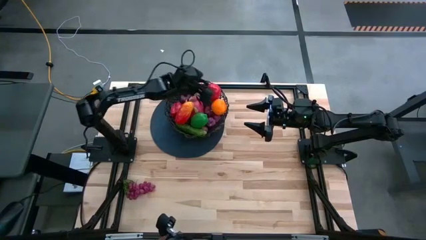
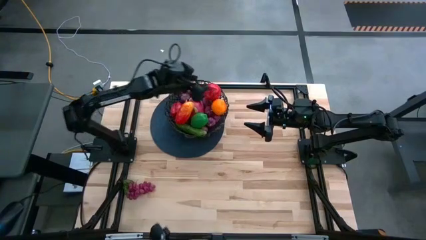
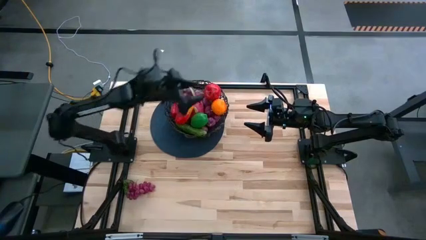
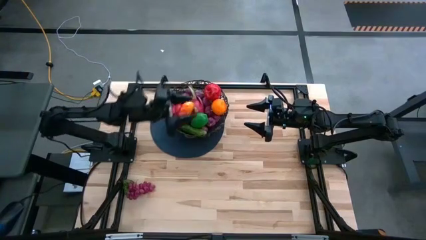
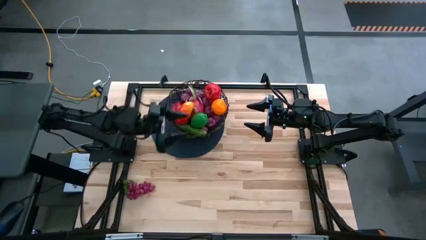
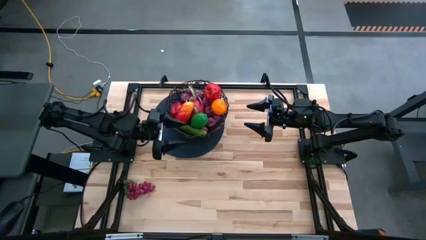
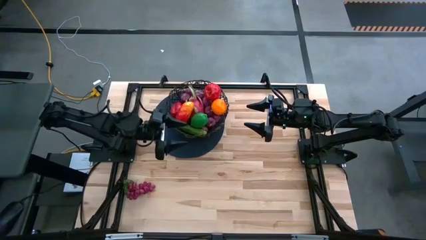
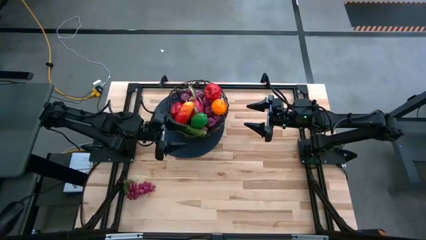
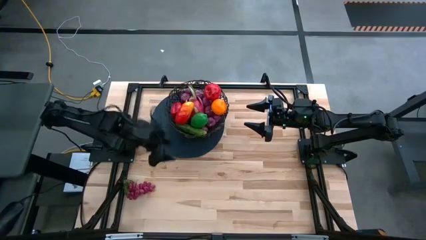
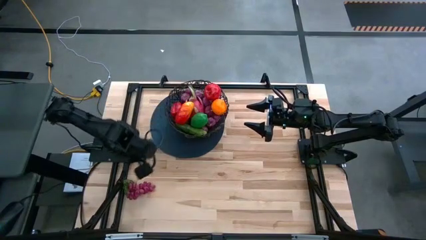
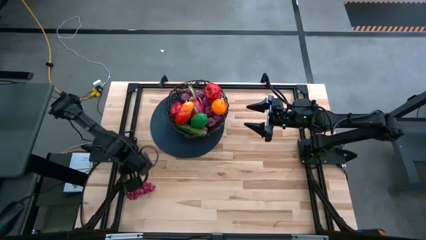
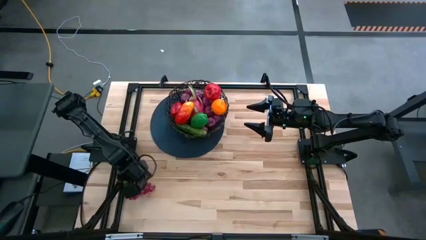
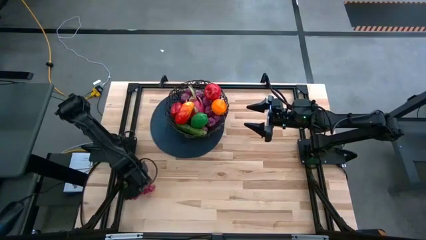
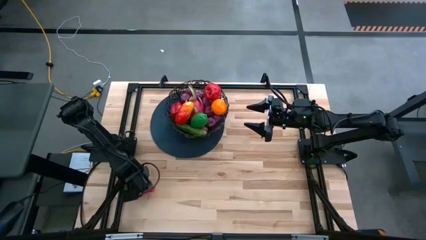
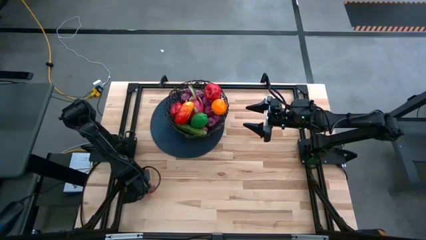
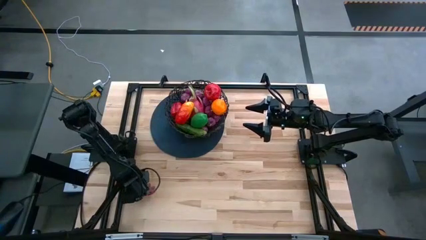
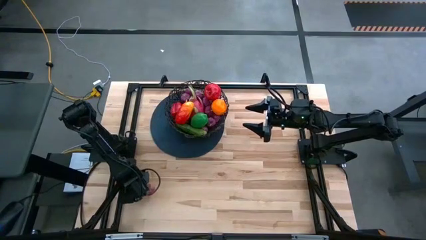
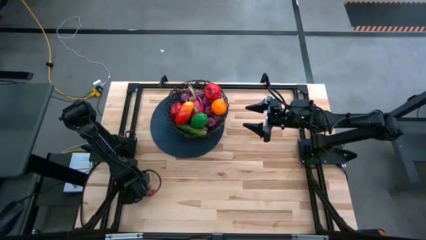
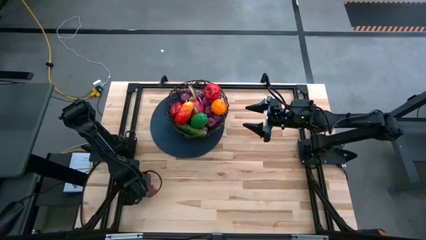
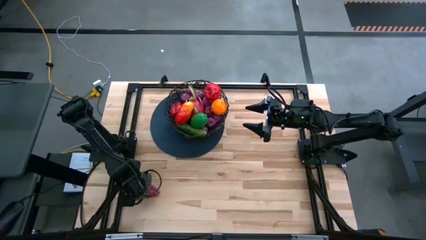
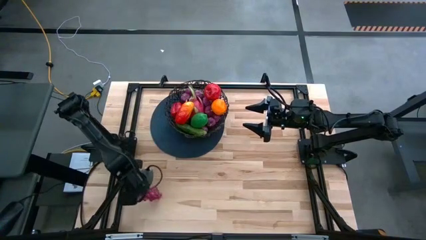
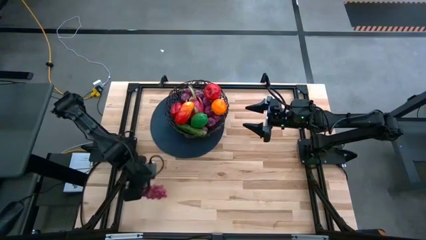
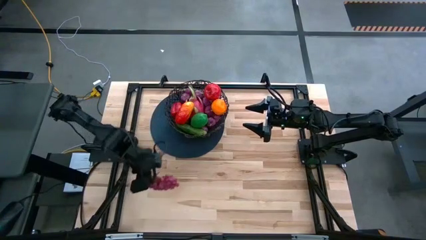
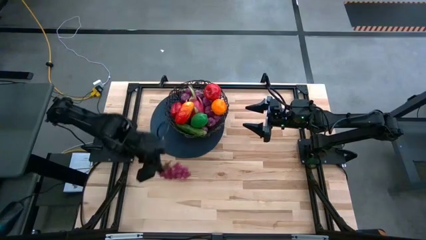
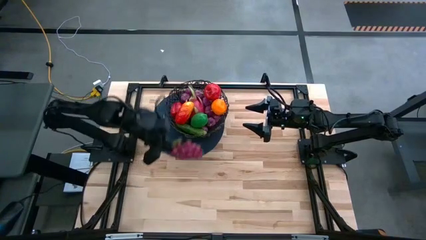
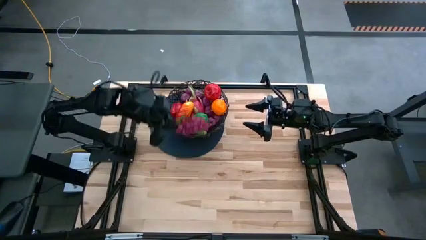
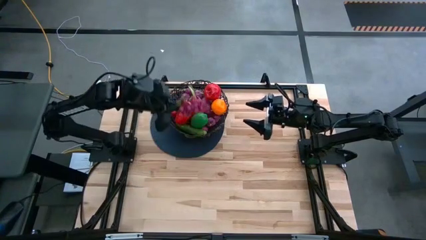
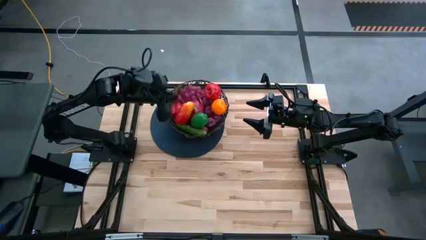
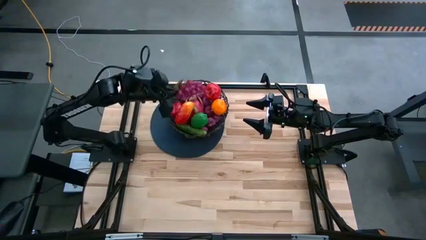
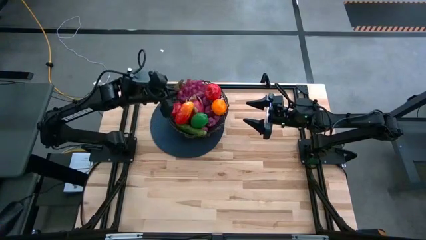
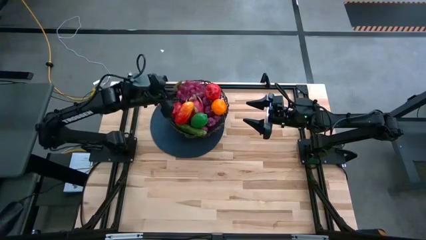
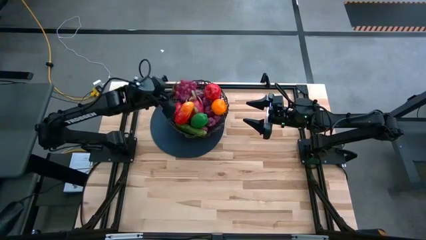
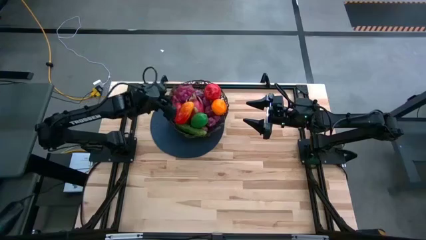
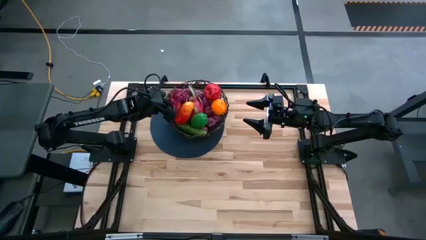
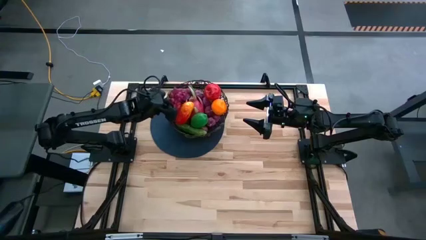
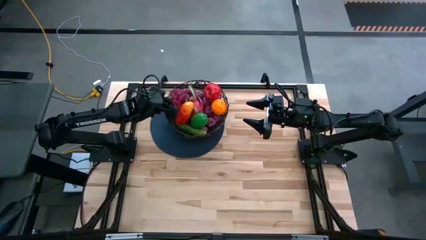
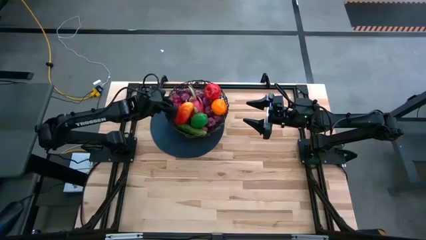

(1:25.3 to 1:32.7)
Task: Build produce basket
Put the grapes into the black basket

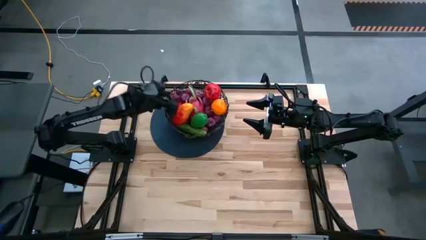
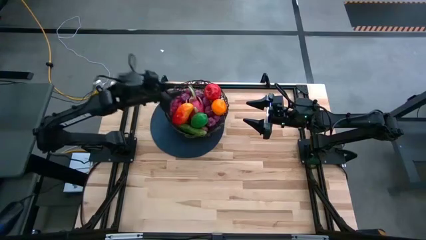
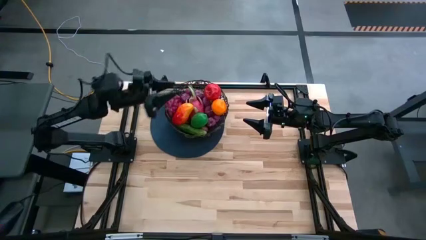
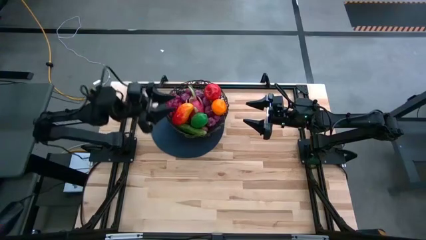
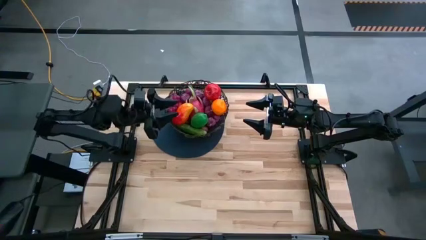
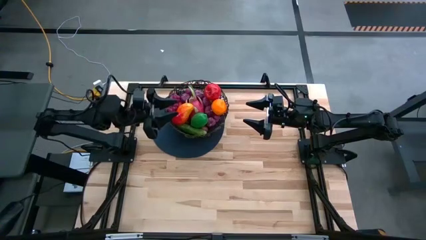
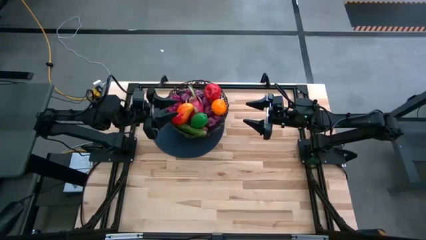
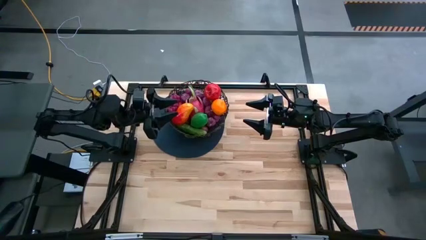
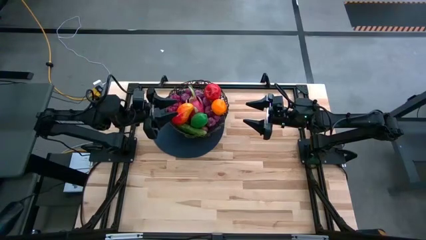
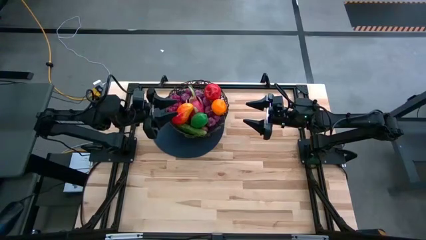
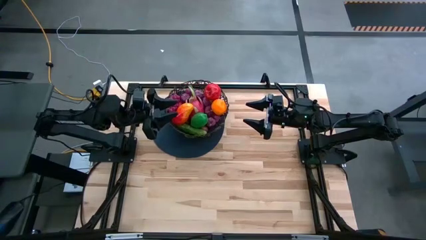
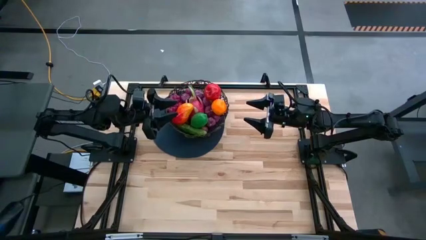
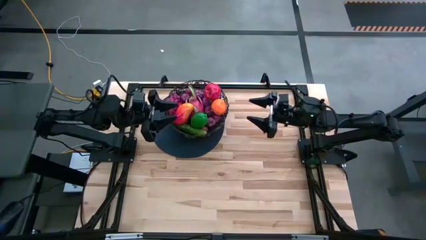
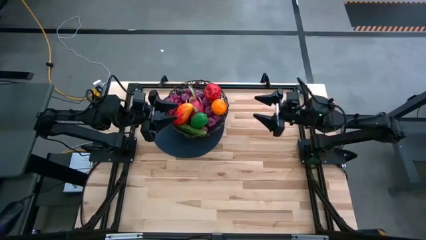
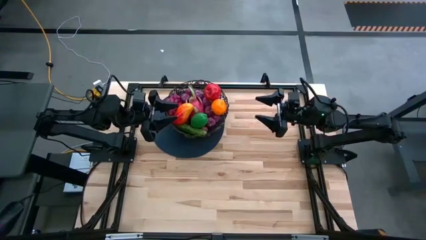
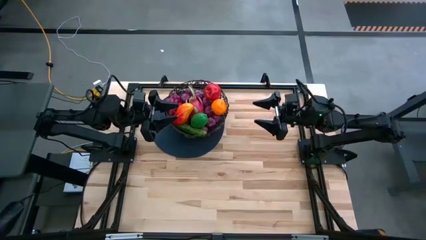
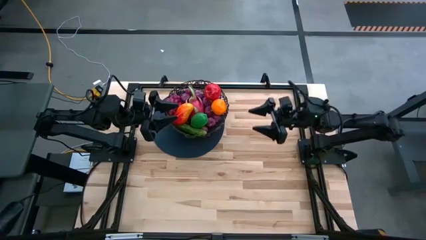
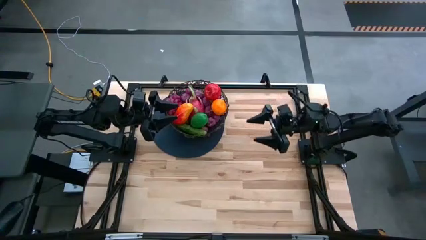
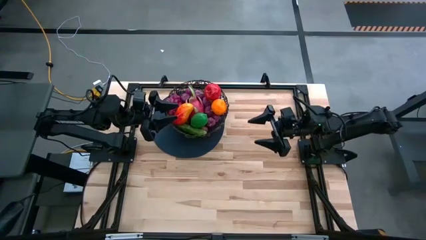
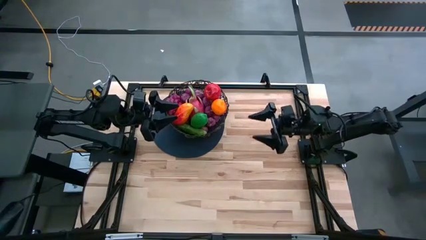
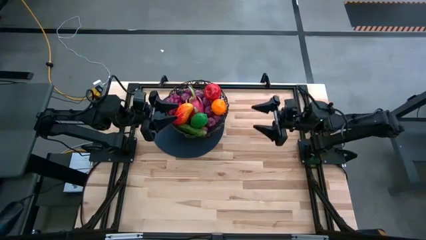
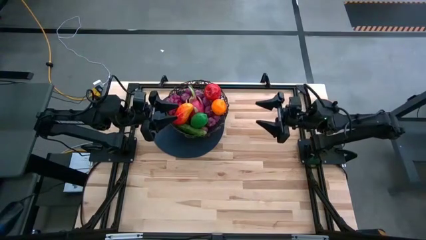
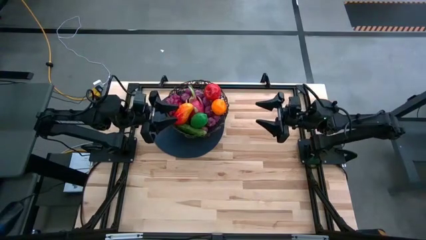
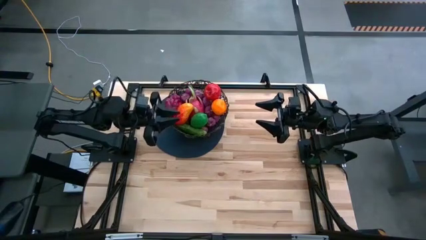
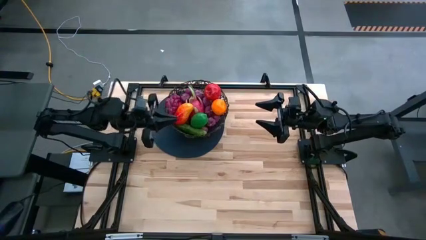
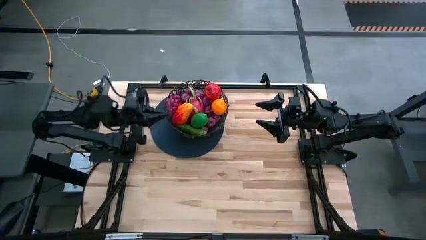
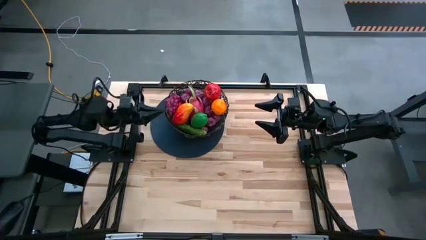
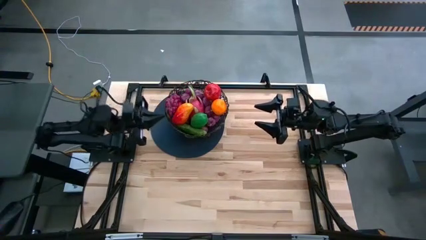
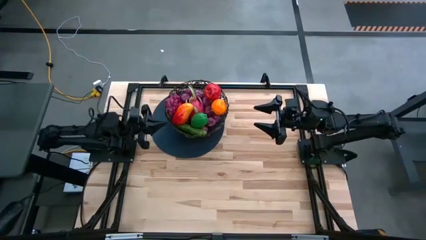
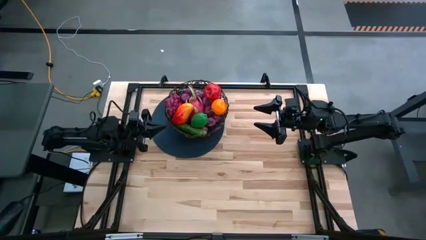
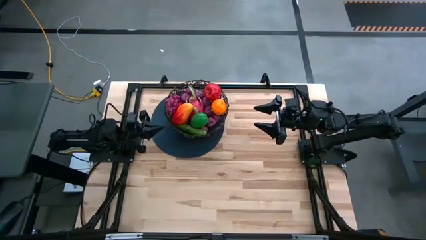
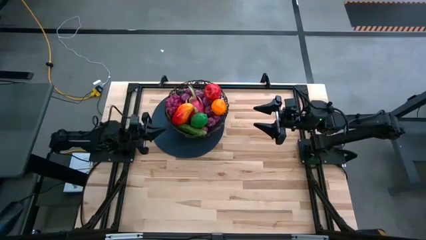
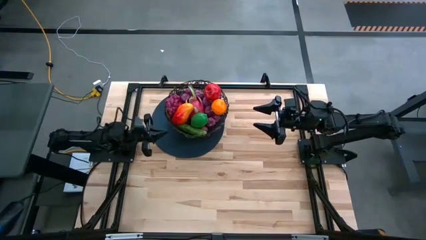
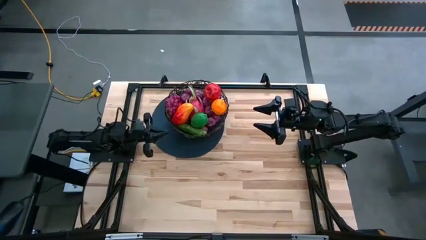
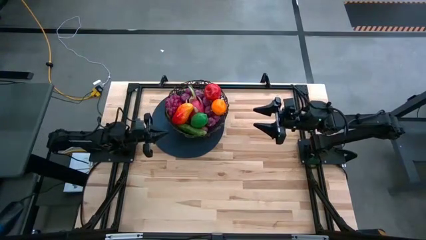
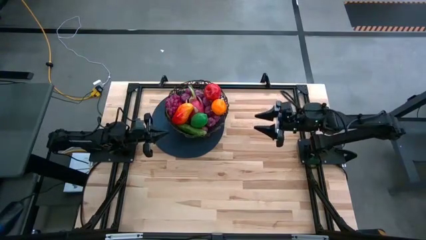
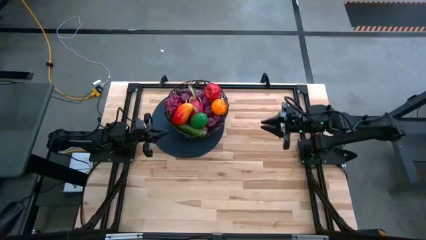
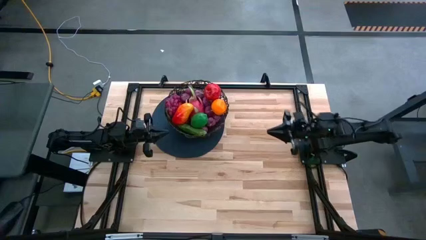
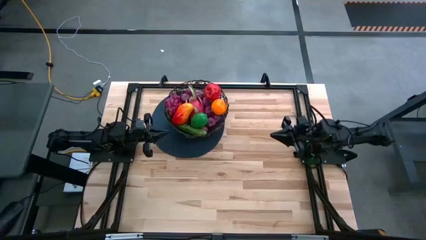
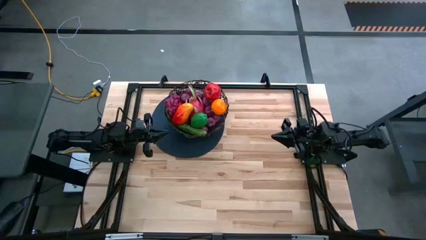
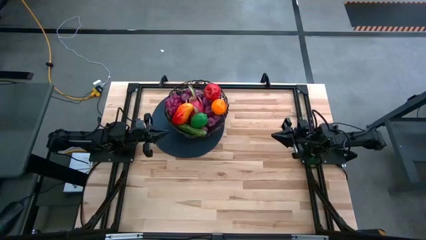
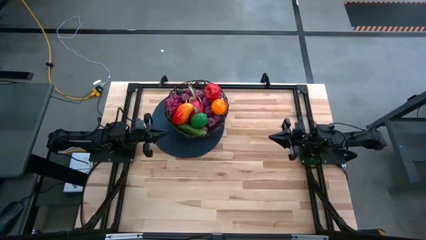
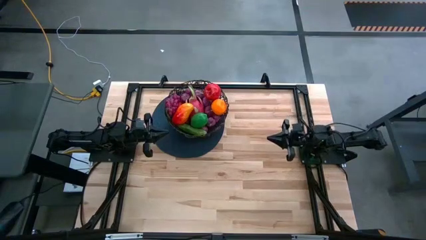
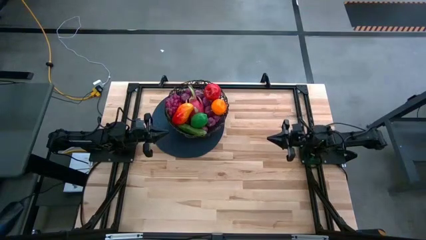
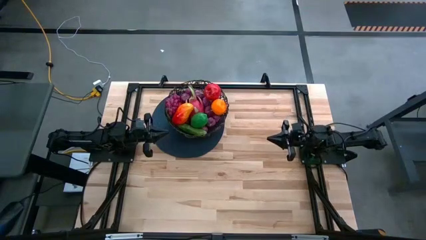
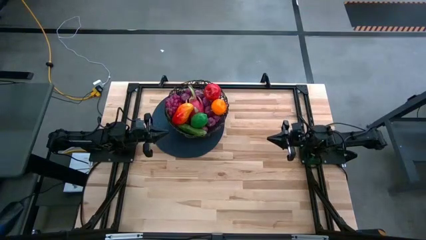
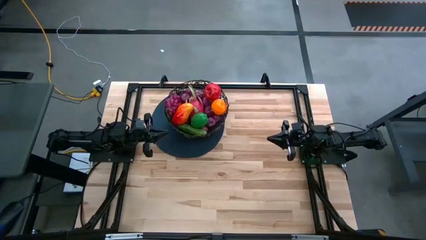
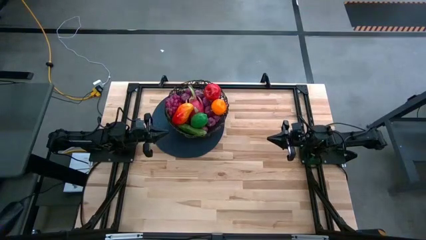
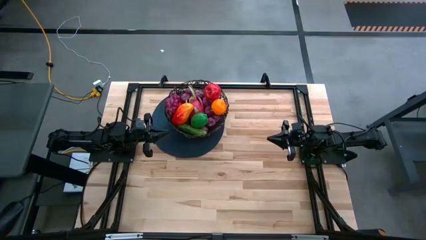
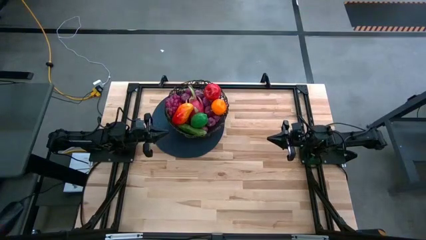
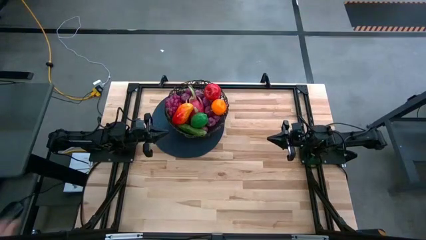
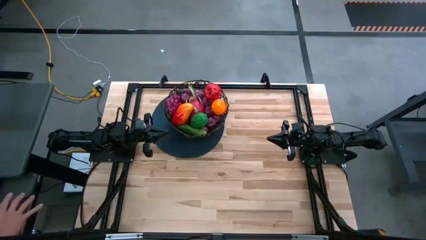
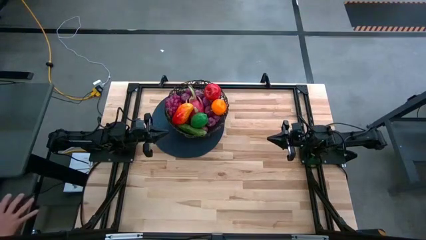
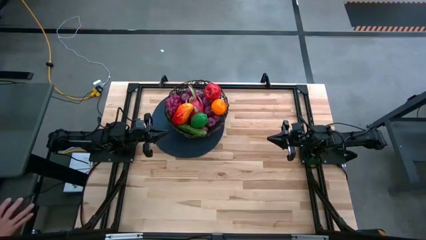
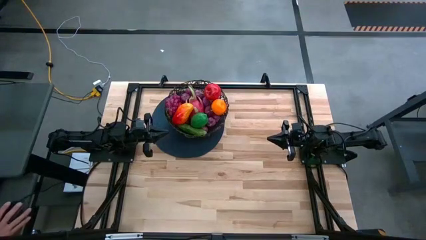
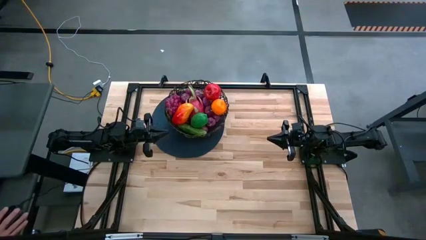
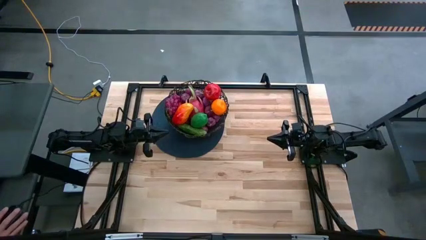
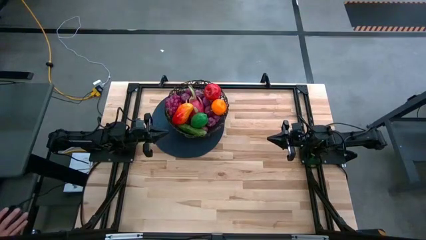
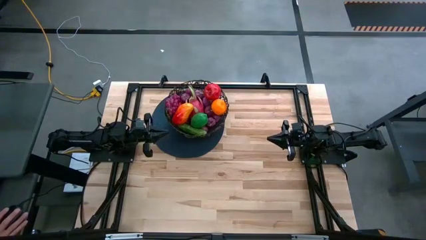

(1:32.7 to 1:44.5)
Return to Home Position
